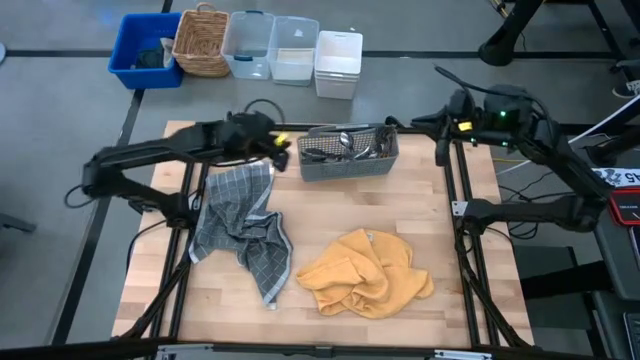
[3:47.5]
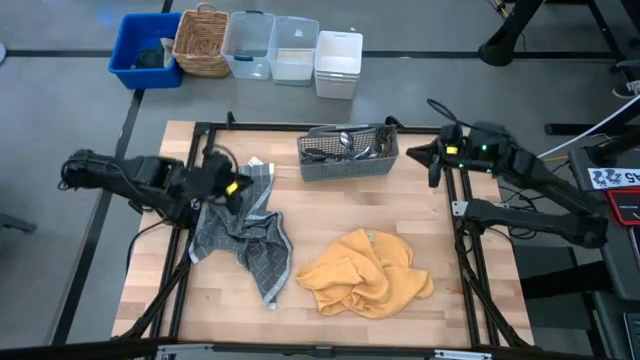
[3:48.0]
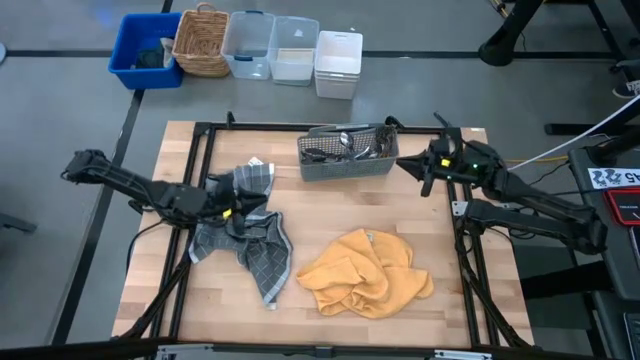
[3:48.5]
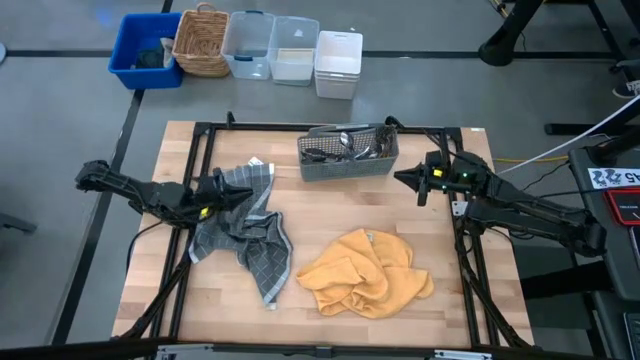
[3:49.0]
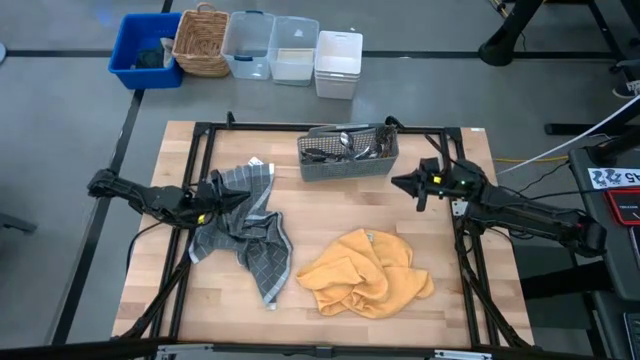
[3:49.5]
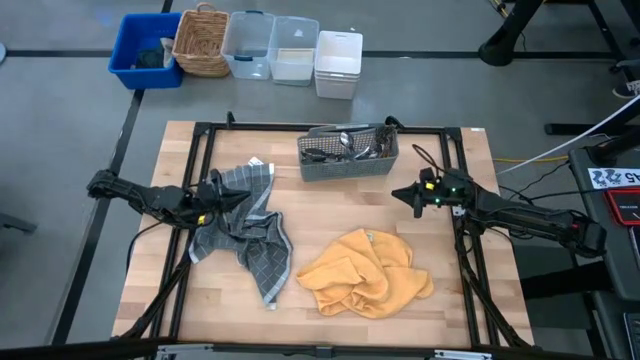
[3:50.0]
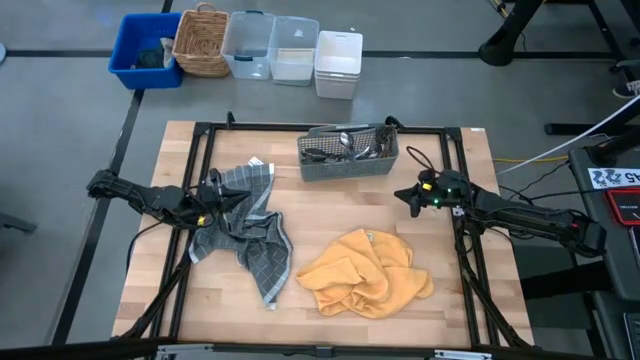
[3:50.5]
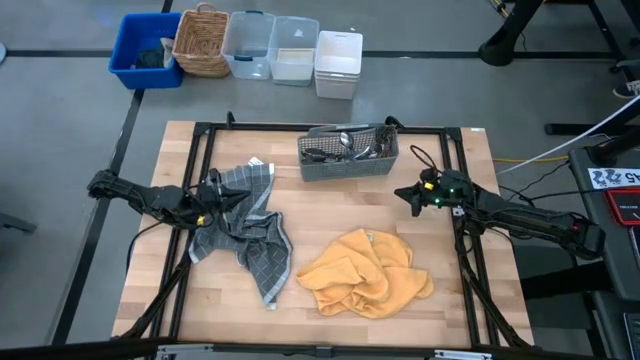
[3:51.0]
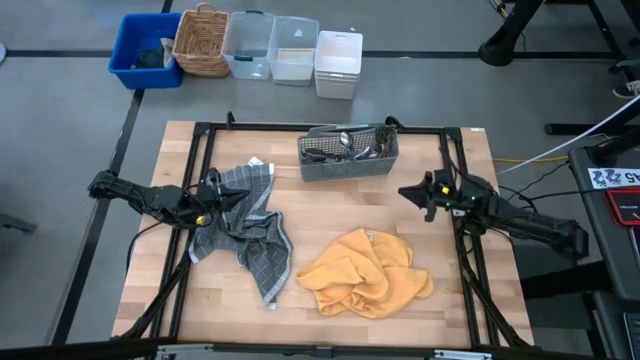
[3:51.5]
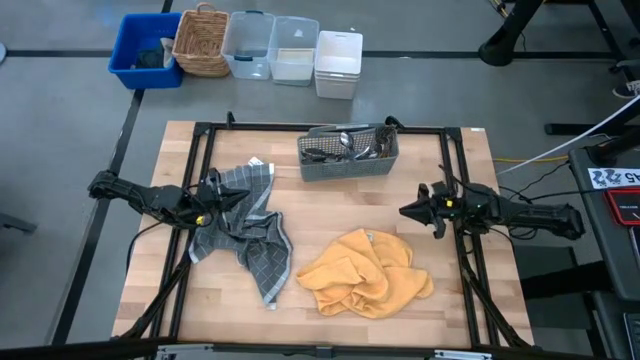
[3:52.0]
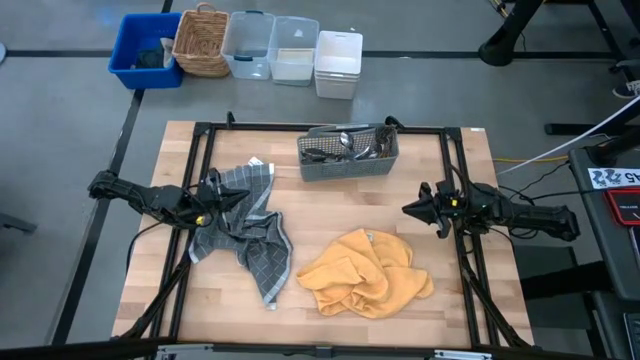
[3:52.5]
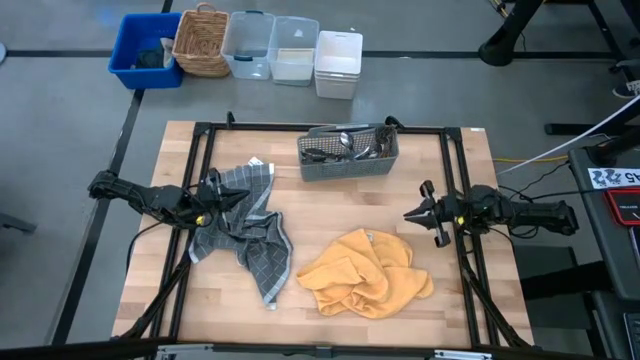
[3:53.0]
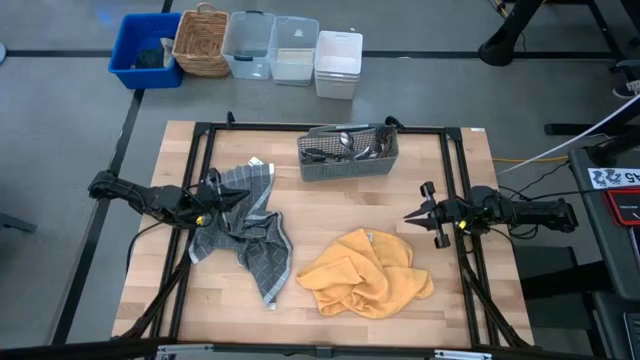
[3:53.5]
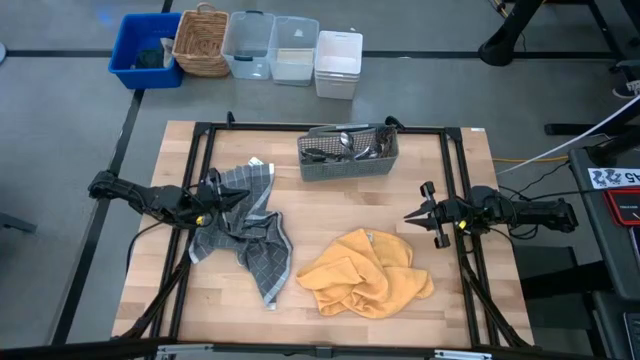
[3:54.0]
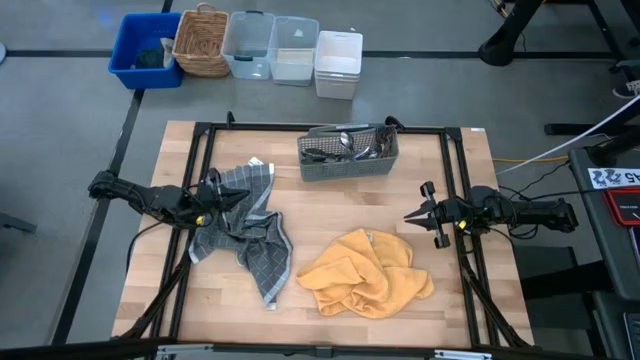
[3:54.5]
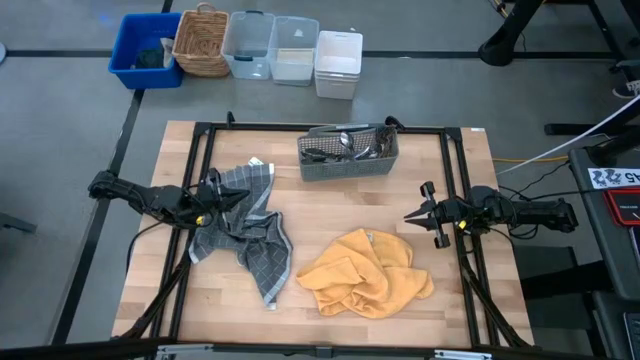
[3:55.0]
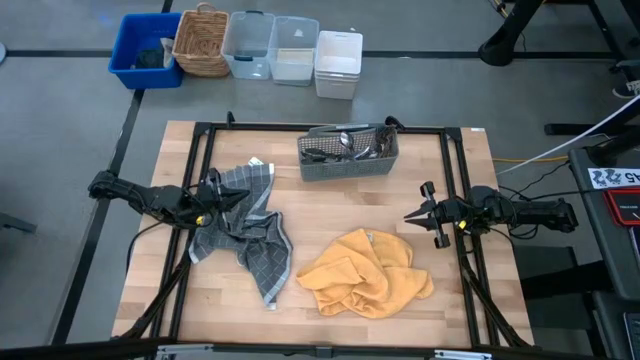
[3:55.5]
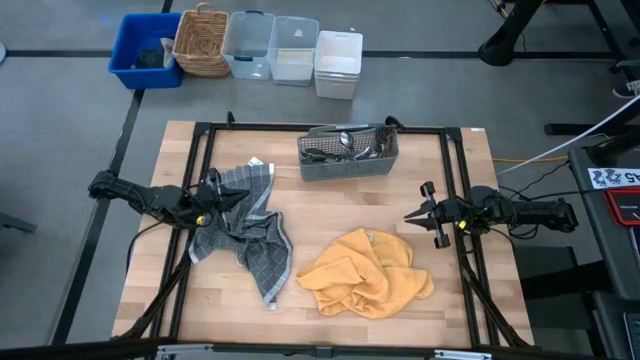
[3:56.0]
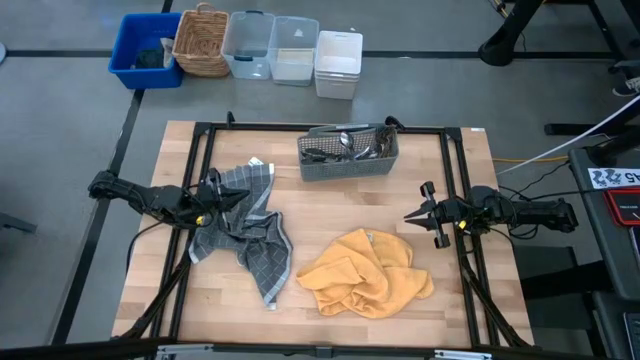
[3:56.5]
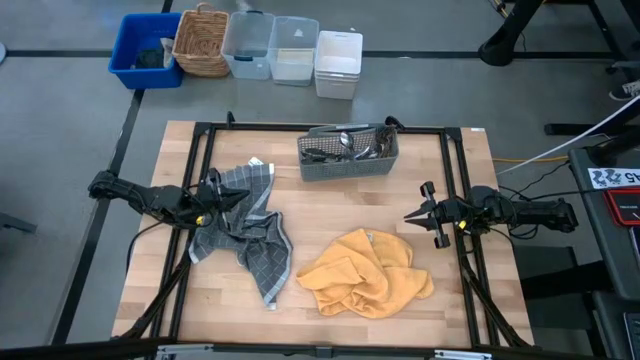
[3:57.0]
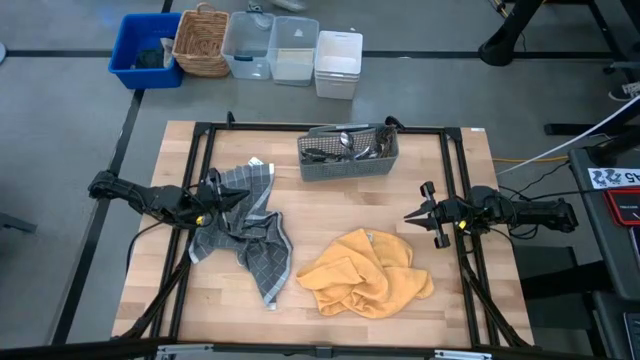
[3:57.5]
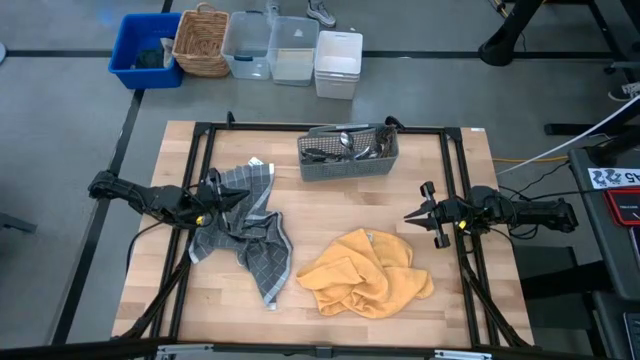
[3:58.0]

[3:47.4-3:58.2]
Task: Sort silverware
Return to Home Position

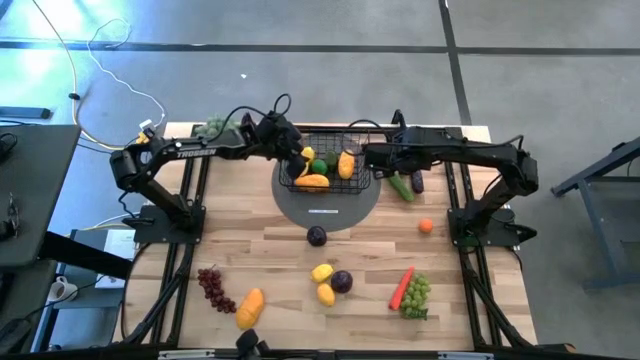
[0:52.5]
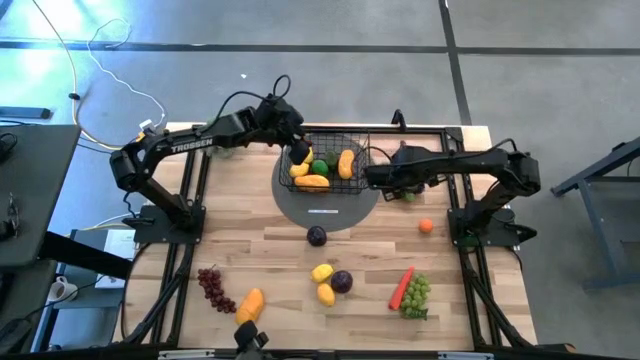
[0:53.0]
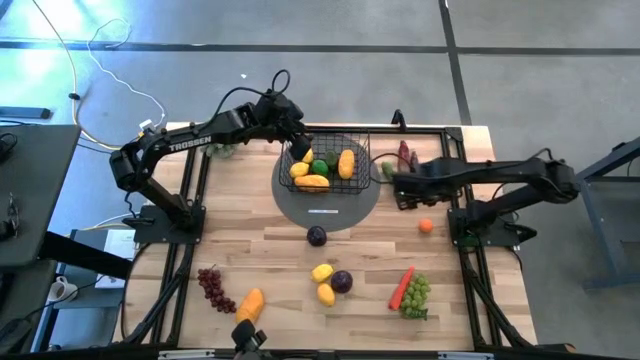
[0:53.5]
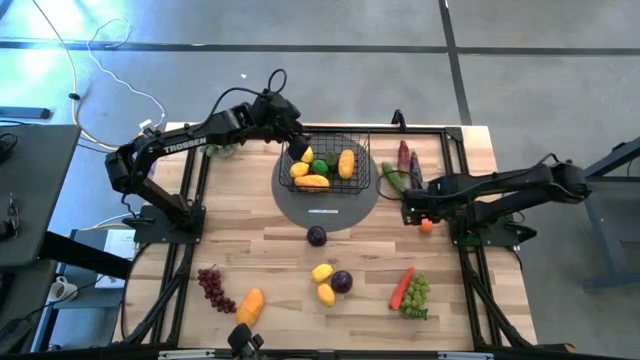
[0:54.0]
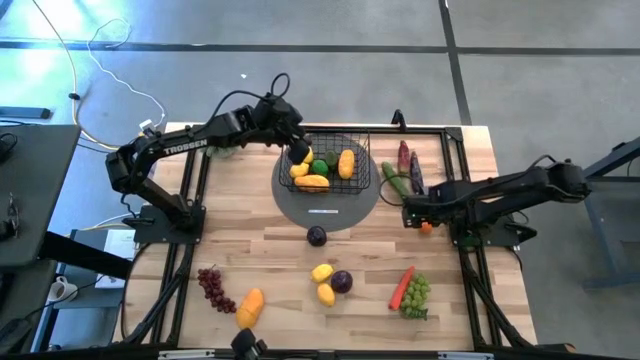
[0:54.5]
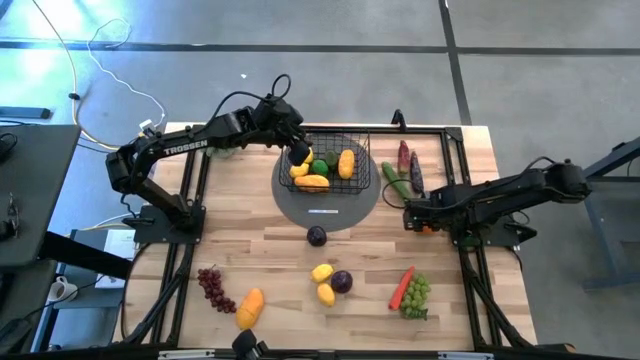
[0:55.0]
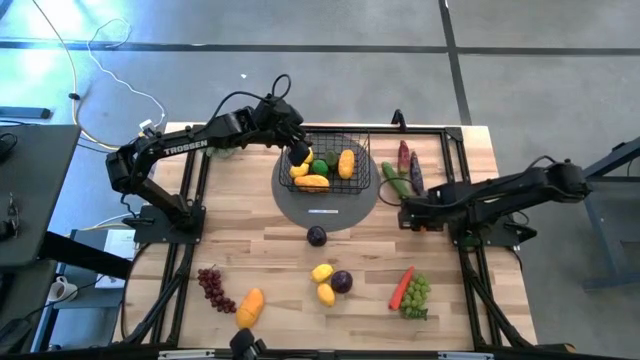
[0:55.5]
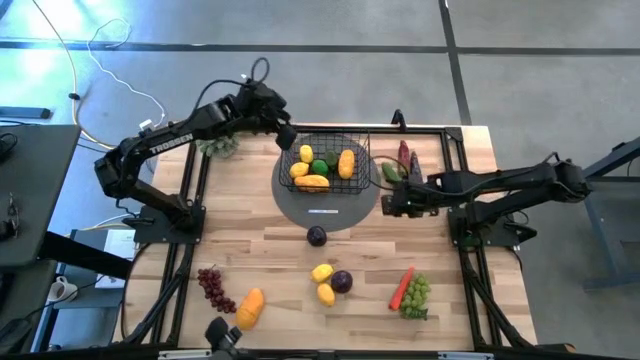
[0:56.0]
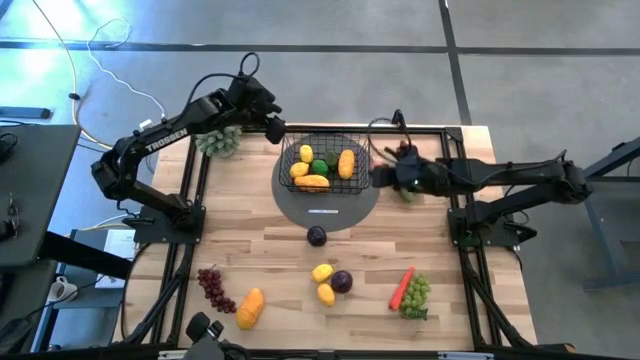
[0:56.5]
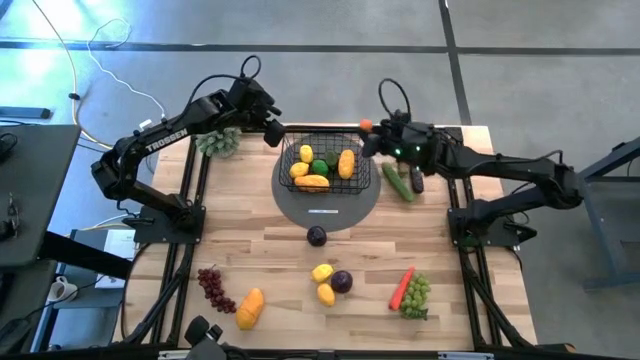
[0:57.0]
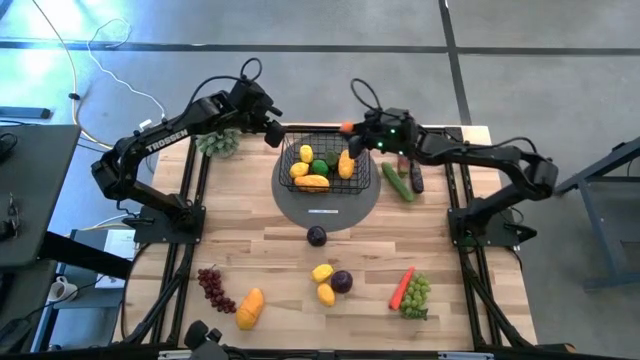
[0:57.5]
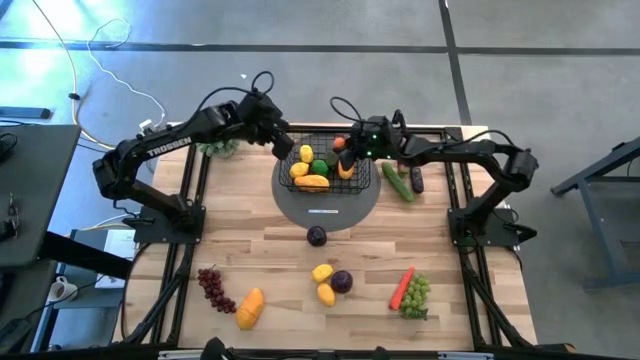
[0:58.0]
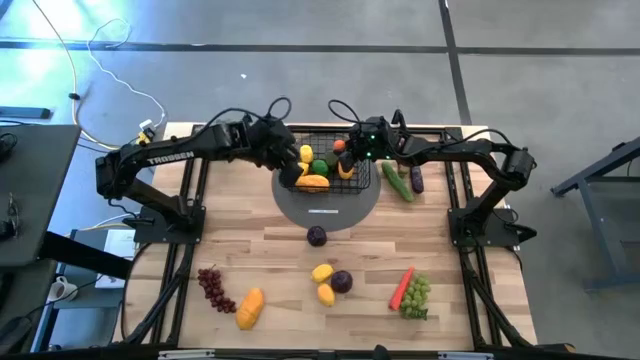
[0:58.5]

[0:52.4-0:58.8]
Task: Build produce basket
Put the orange into the wire basket
